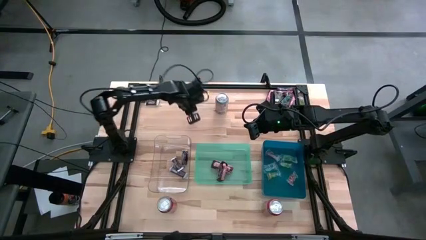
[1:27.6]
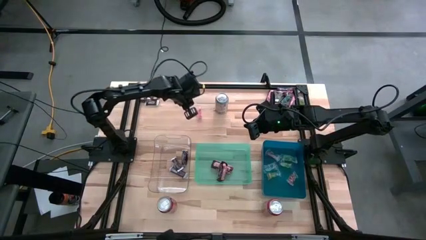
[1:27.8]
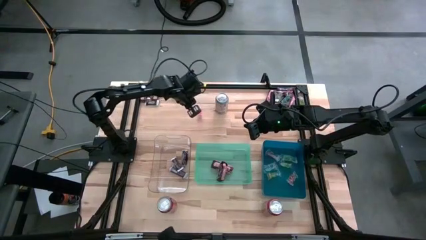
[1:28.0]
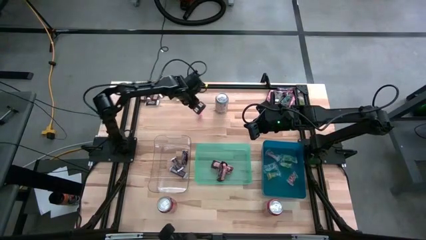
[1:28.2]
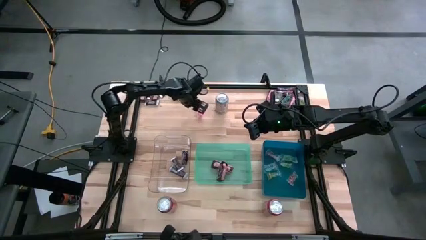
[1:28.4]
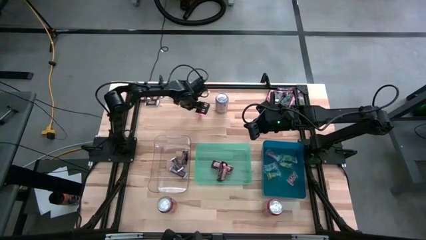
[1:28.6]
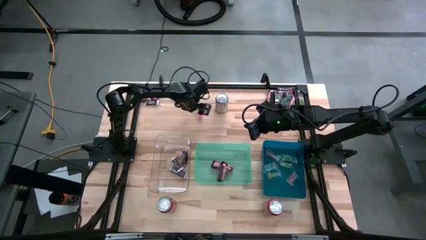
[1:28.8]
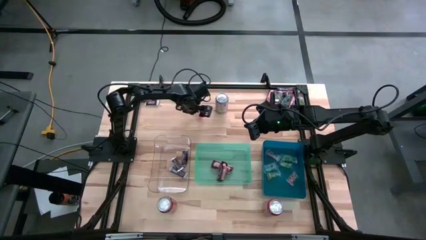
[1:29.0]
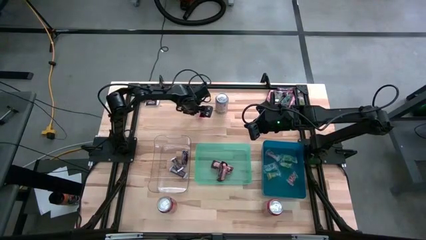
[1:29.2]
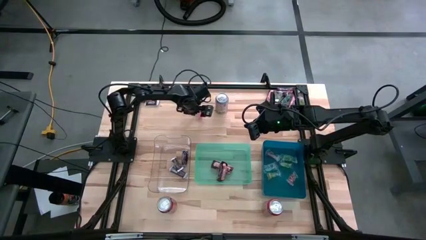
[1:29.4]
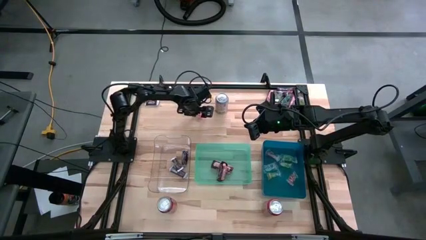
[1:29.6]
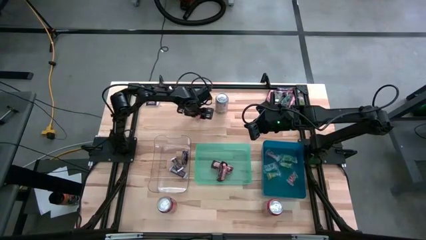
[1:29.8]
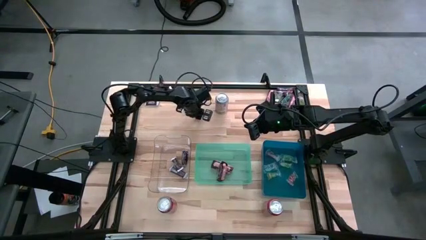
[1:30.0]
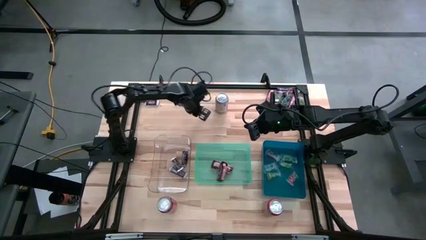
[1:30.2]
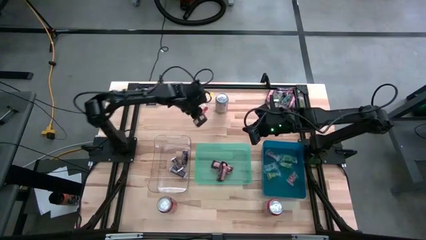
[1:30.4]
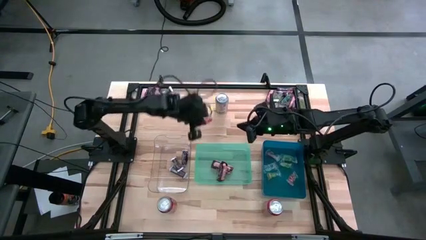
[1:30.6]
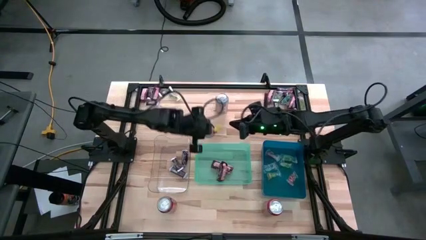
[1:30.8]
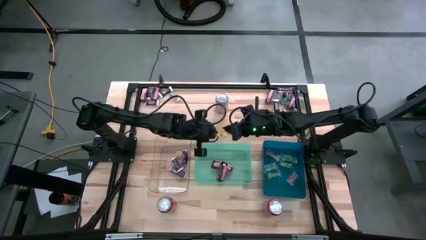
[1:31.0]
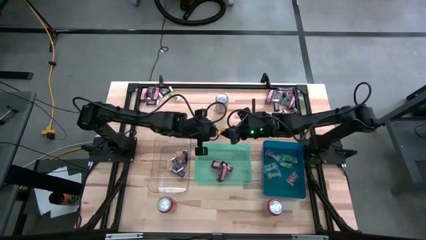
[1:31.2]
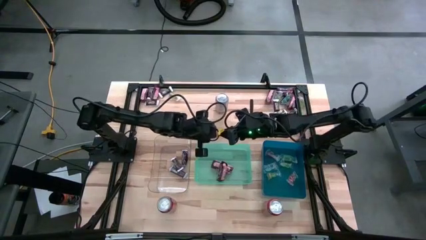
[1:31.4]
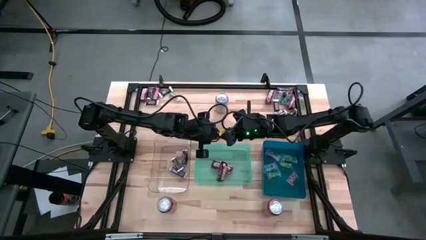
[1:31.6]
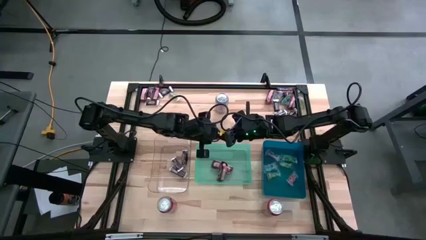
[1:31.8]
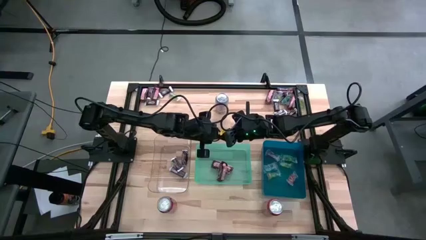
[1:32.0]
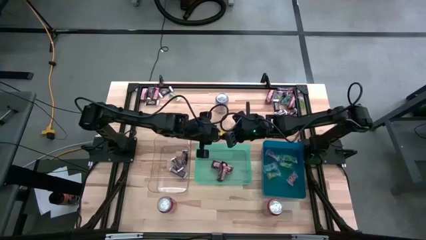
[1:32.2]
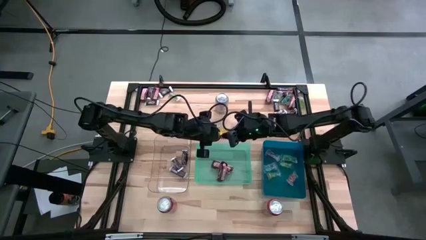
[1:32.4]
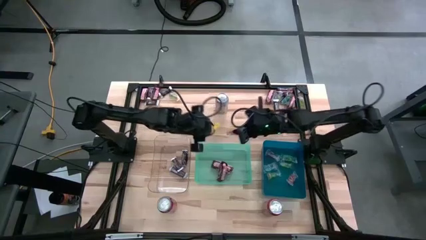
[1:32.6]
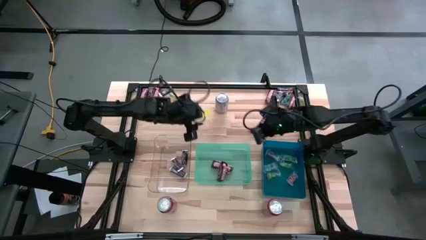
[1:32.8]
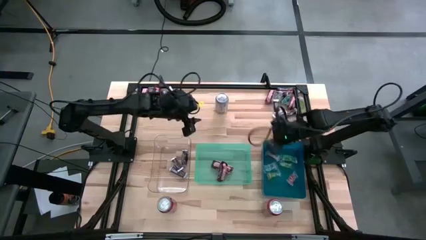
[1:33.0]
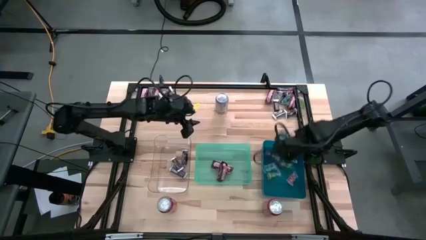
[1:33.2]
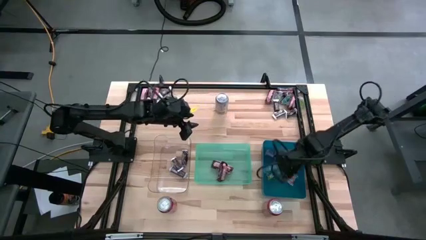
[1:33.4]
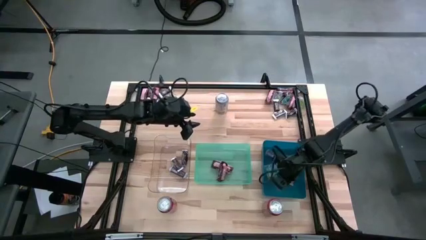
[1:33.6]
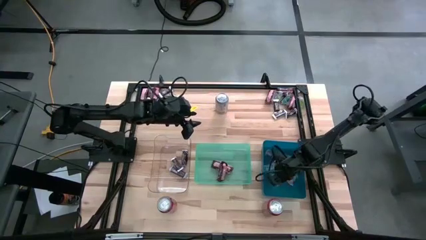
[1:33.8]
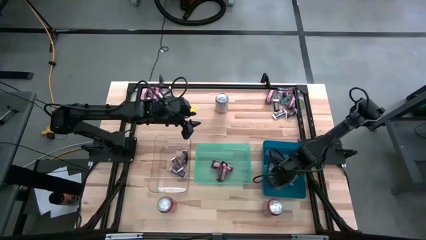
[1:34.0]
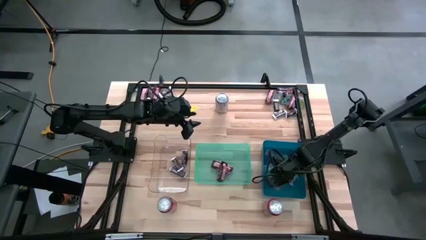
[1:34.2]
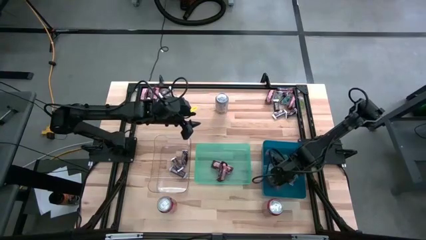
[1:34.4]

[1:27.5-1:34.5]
Task: Organize candy in baskets
Put the red gummy into the blue bin

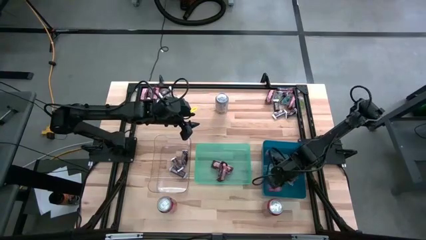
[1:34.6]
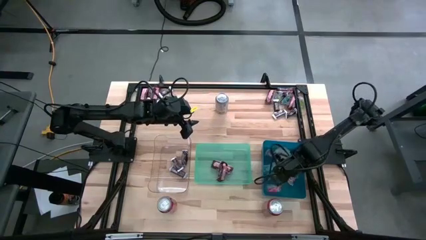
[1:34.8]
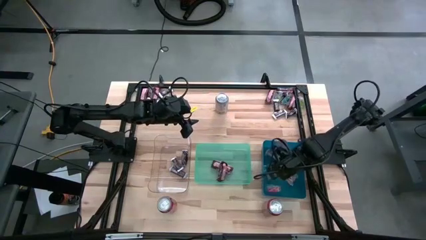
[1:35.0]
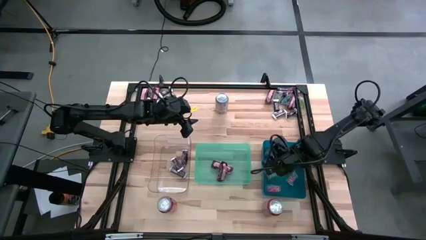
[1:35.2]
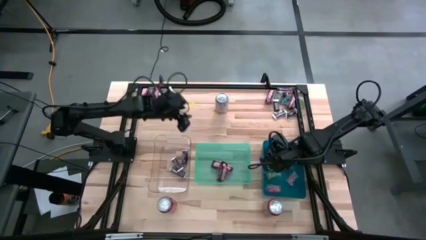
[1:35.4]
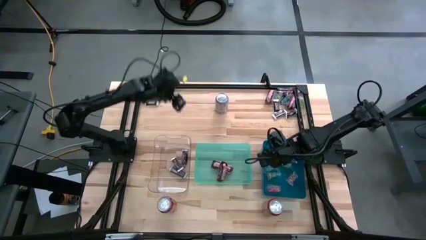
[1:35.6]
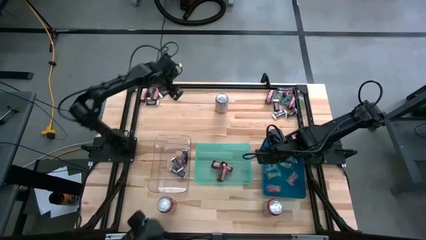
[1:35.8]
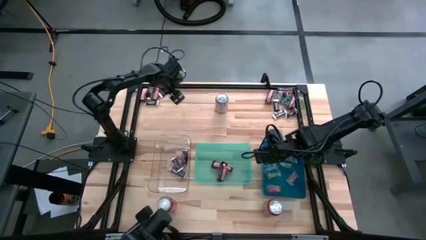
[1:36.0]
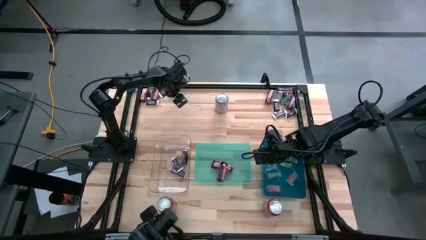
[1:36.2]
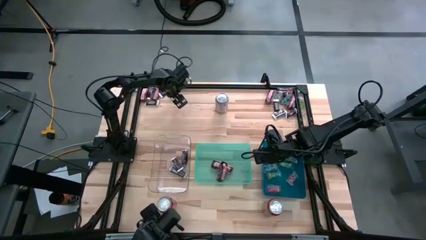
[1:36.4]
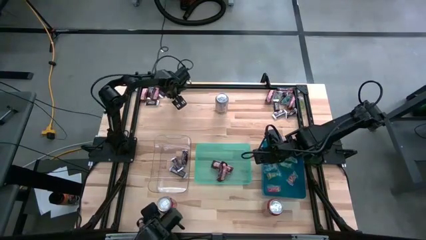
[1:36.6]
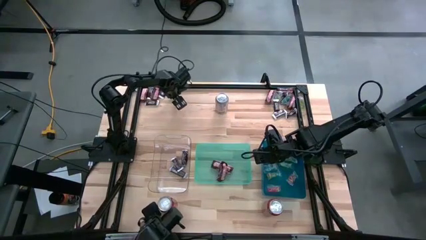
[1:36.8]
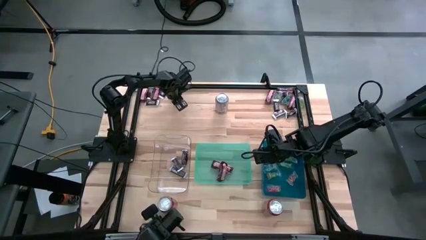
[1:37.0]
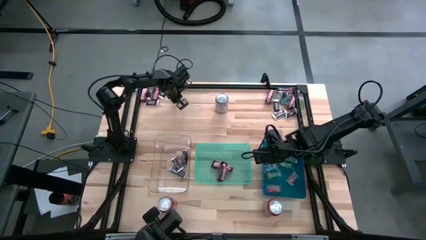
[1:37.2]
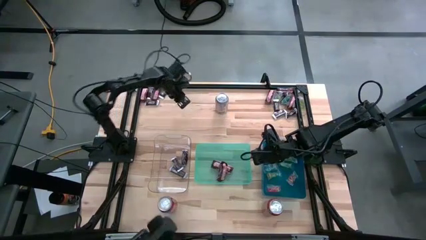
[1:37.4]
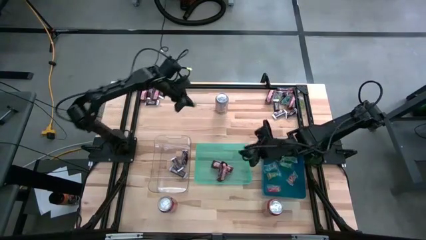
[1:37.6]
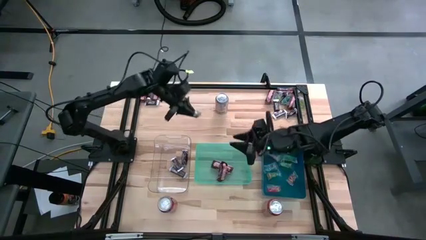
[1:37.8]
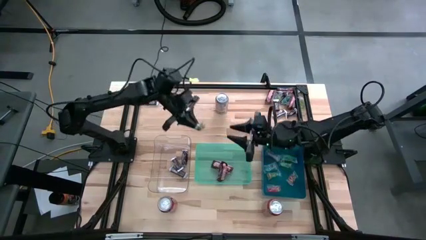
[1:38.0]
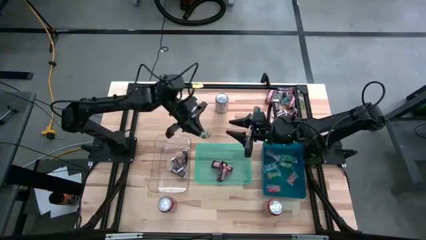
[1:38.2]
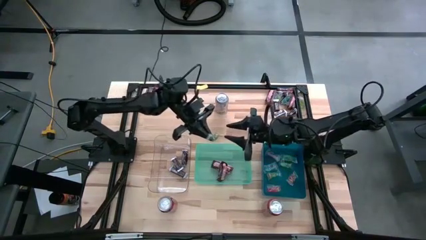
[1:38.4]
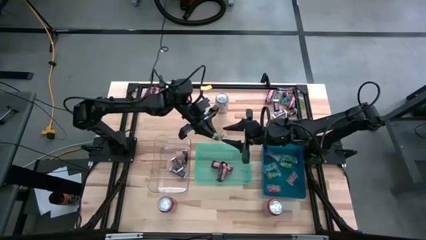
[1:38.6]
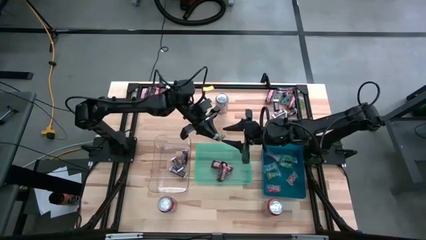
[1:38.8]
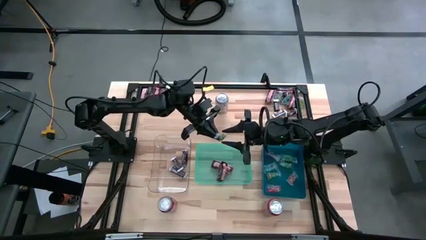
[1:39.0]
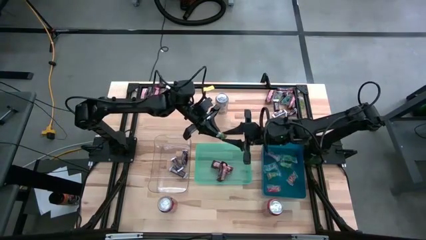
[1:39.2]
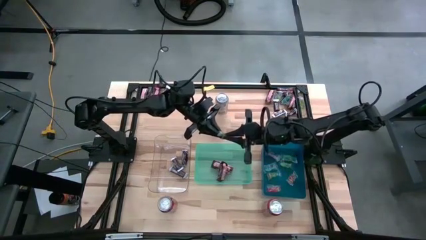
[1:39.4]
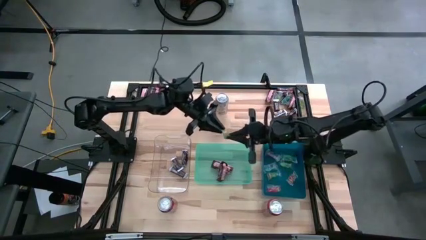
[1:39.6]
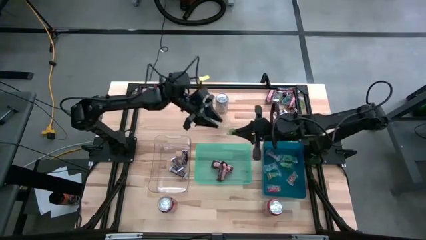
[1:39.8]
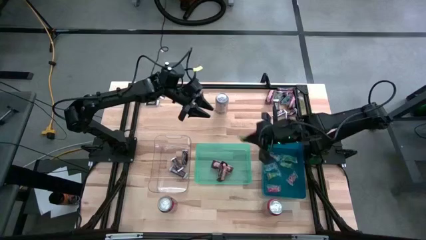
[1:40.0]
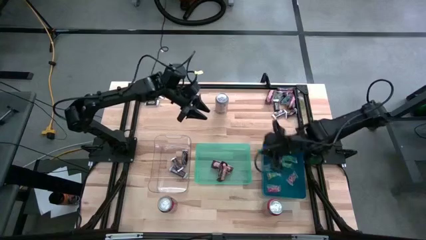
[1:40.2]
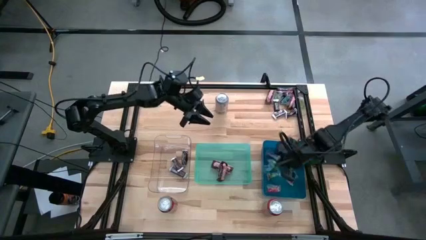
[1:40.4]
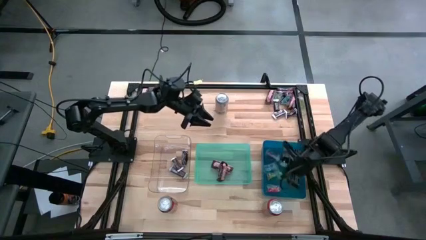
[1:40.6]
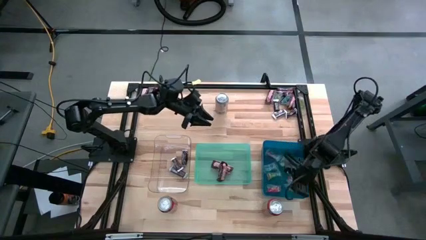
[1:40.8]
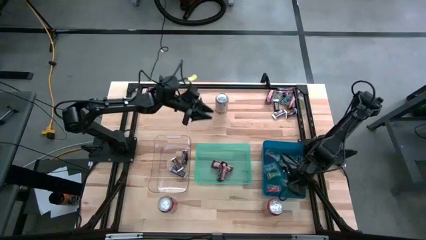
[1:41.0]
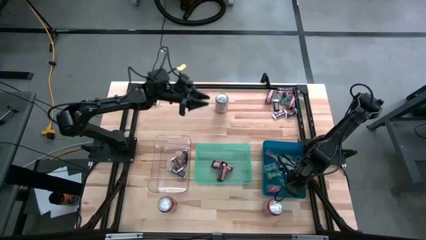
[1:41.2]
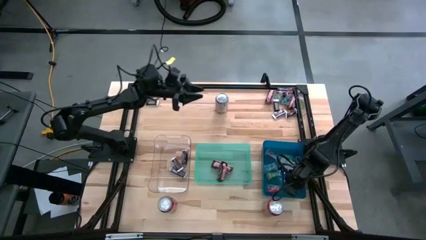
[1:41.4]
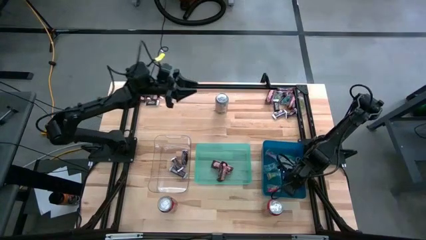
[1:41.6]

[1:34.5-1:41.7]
Put the green gummy into the blue bin
